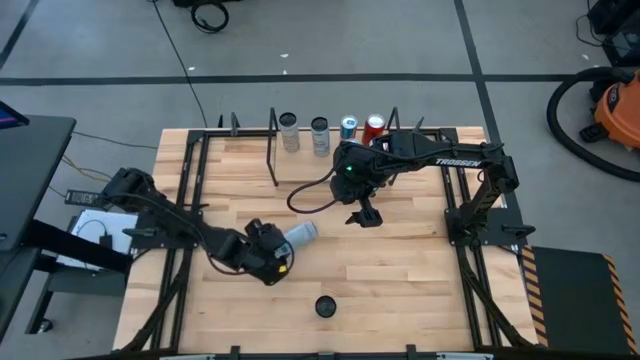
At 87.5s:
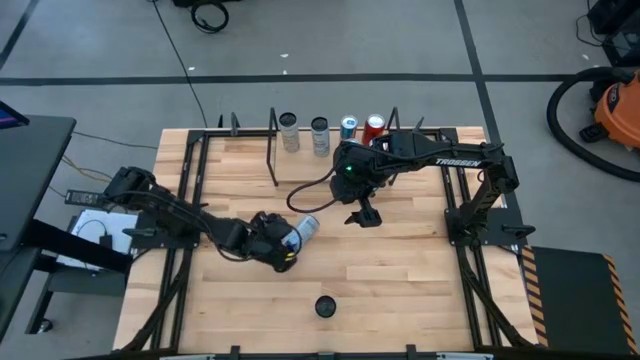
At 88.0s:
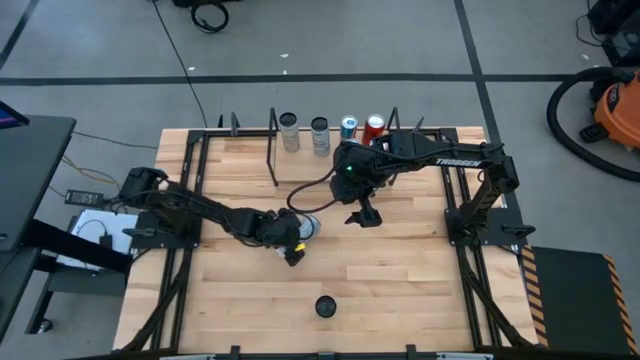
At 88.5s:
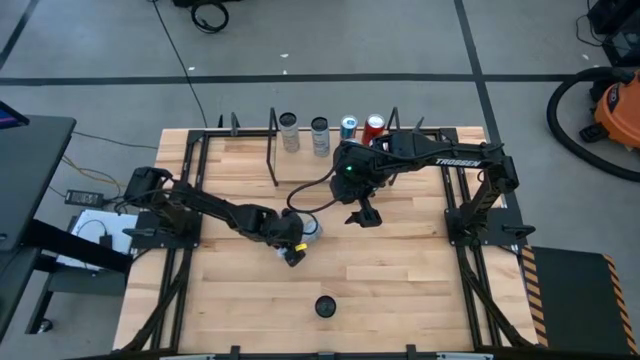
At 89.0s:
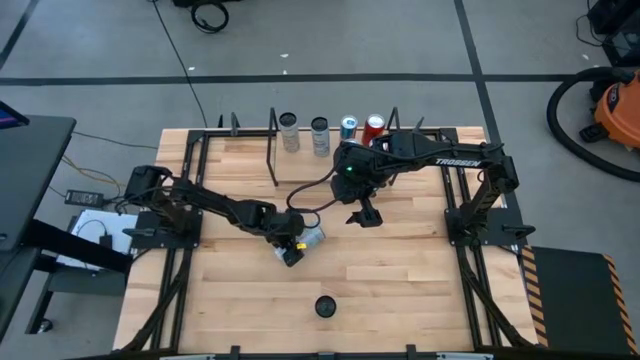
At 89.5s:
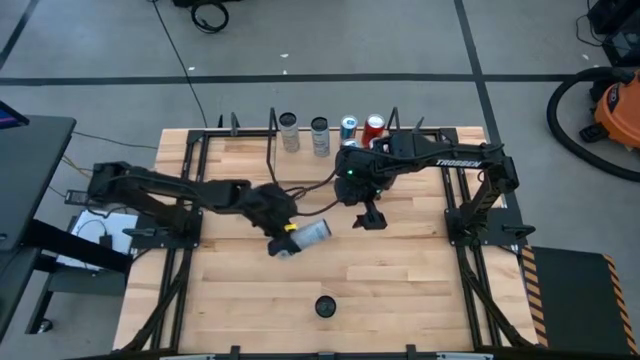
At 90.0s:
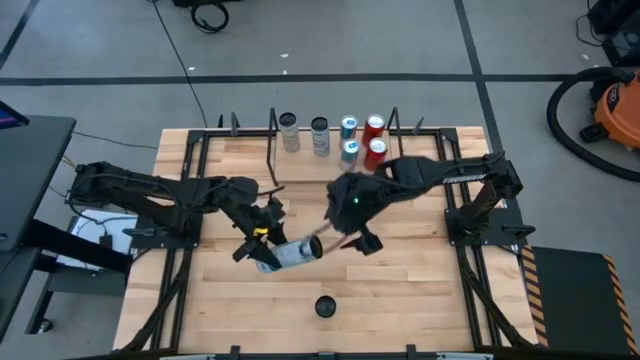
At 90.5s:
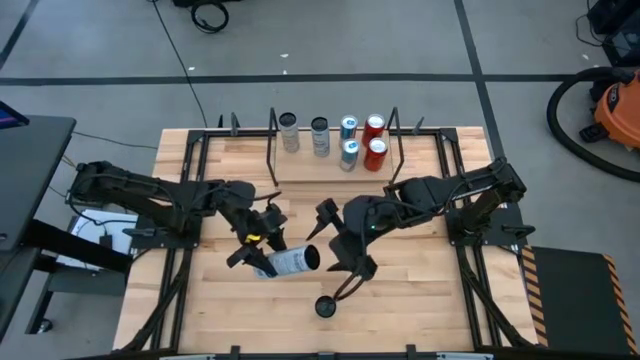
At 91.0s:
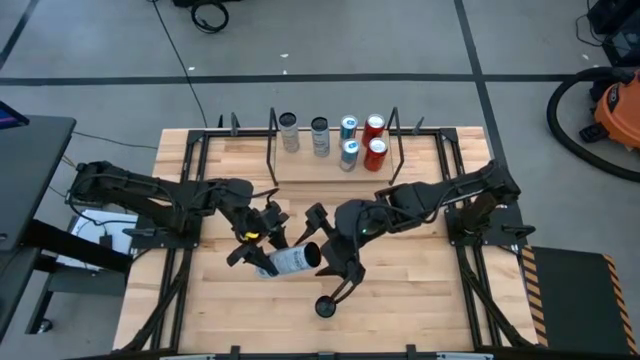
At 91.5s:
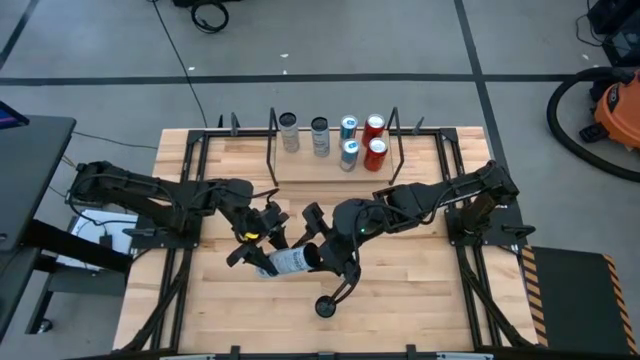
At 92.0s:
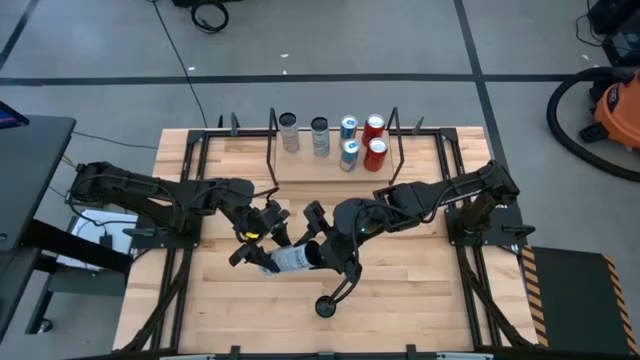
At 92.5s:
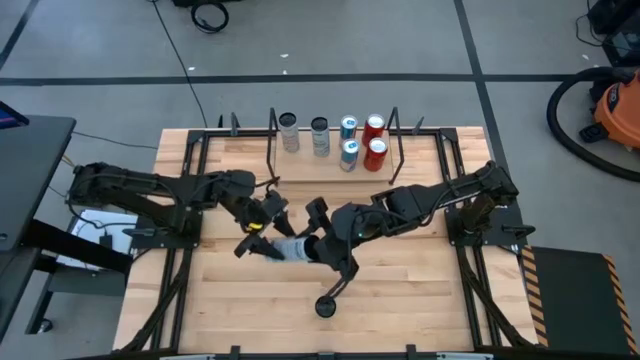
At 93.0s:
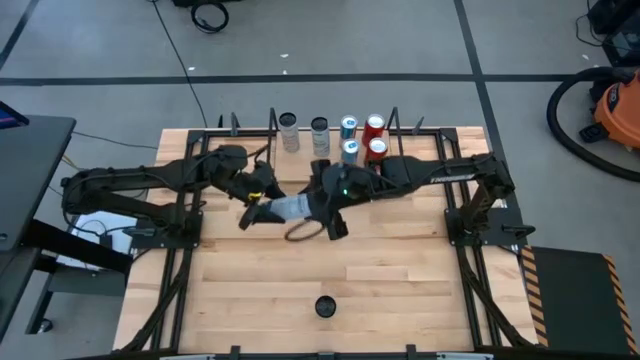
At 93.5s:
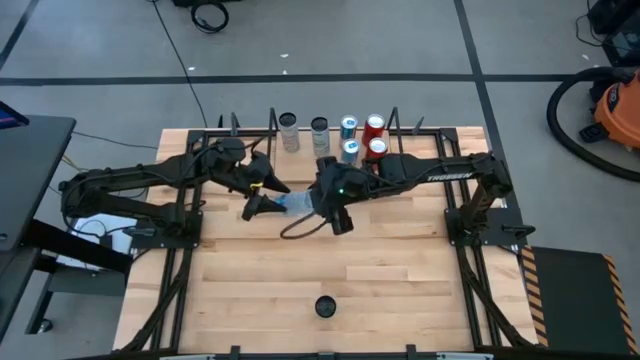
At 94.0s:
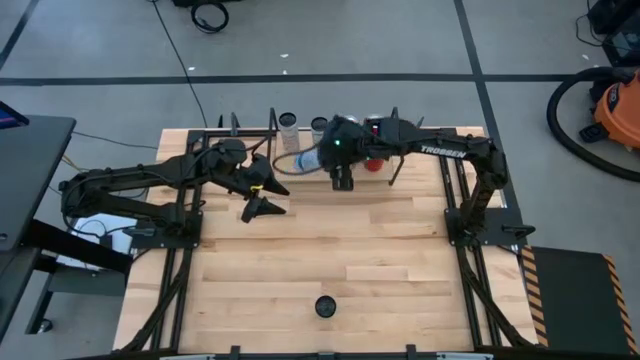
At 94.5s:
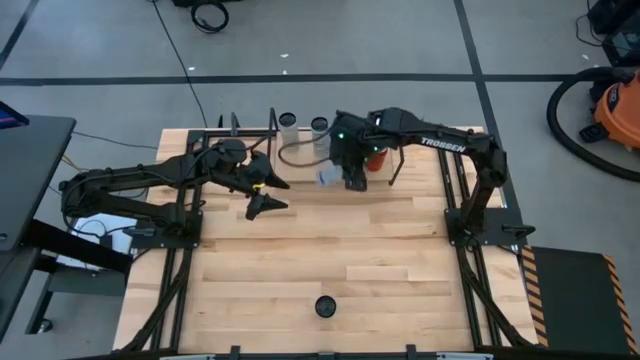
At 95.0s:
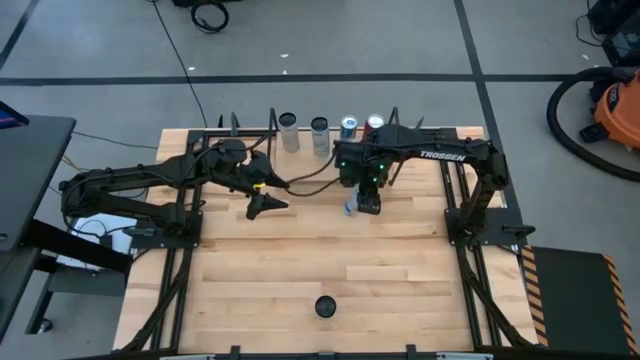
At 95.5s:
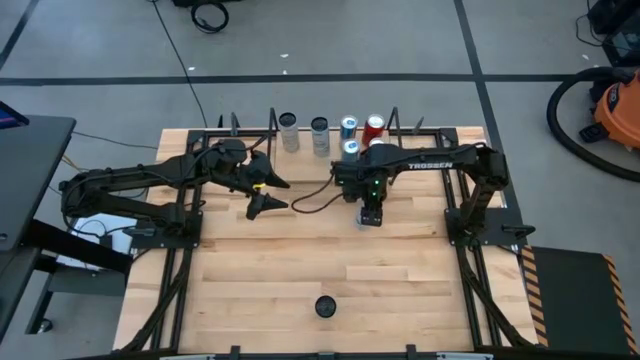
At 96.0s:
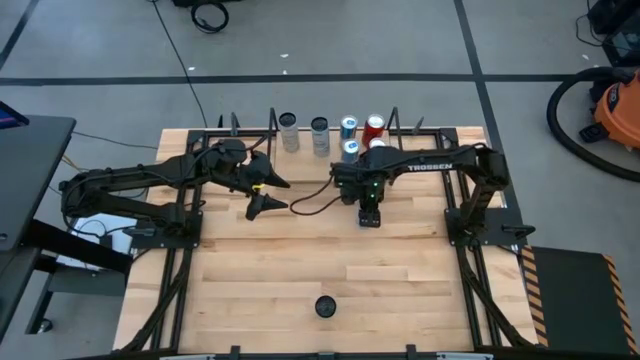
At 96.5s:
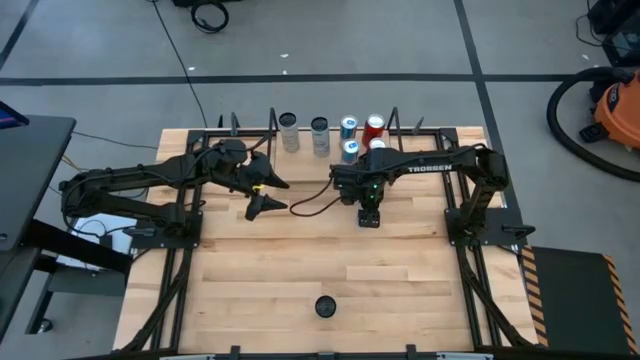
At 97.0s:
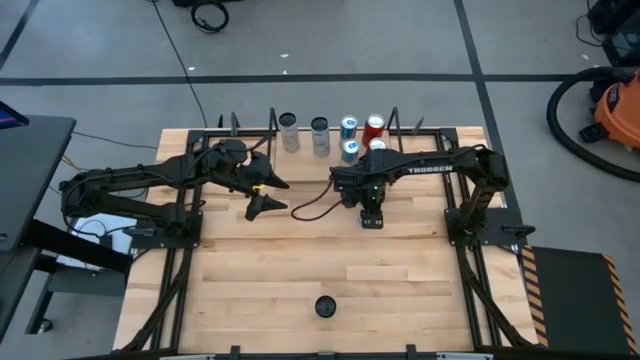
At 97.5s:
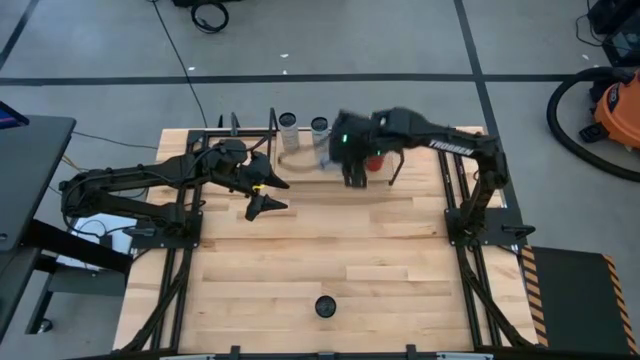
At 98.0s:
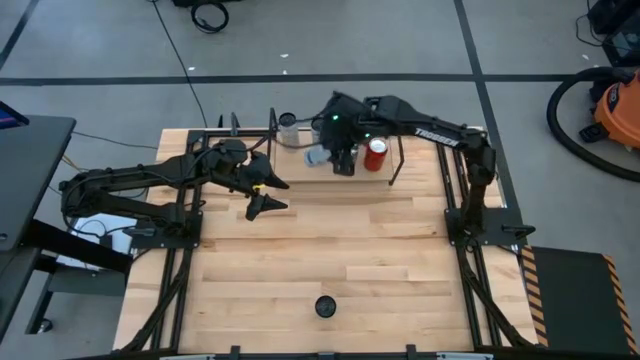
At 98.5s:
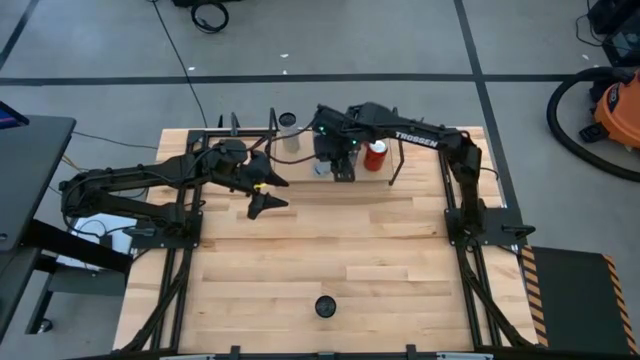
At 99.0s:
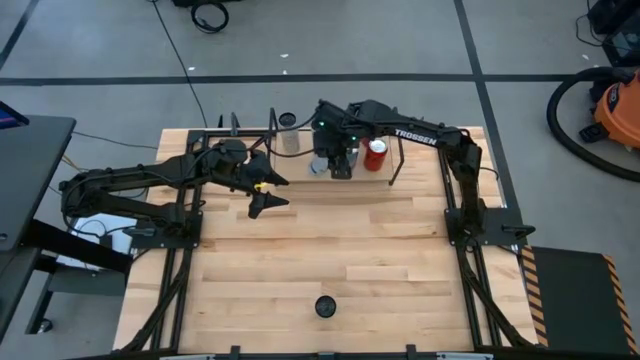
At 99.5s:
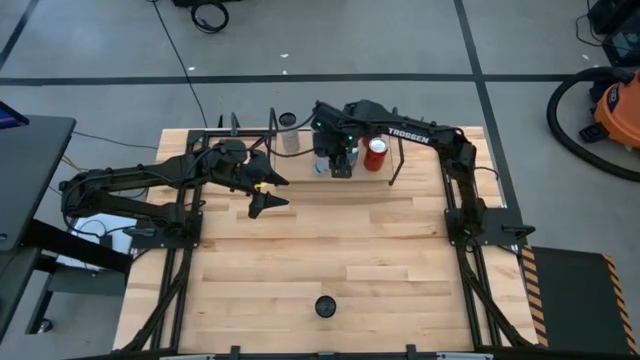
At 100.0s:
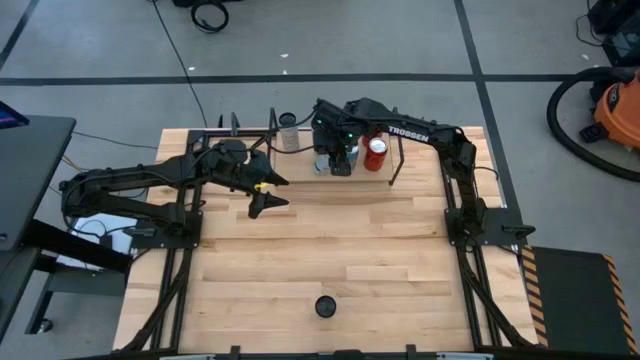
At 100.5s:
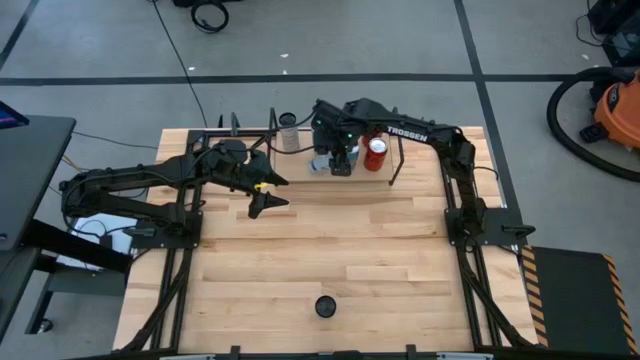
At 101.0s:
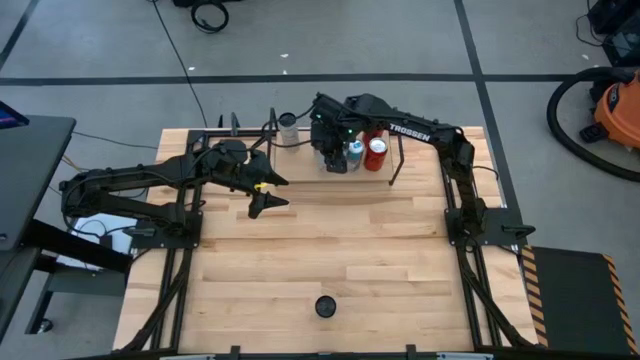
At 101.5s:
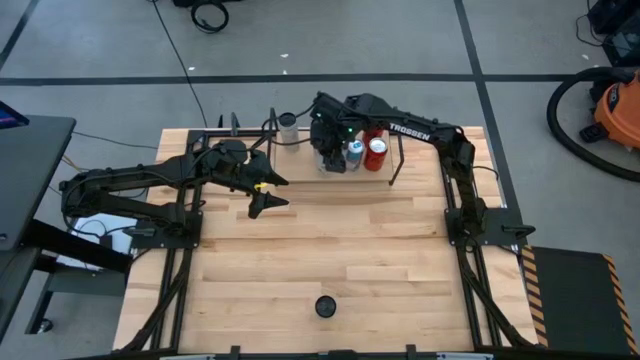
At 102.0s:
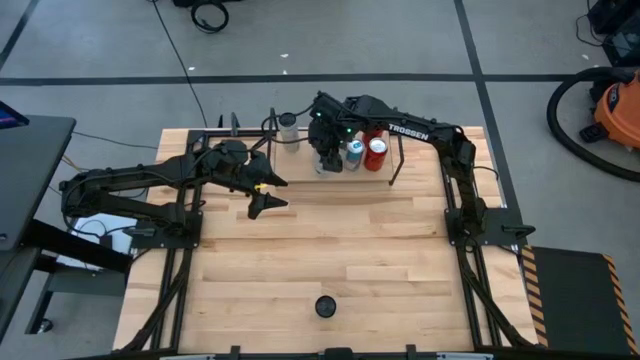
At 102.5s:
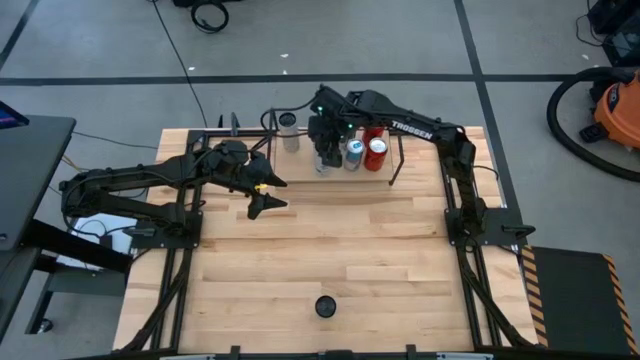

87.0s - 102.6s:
Task: Place canned beverage on shelf
Put the white blue soda can on the shelf aligned with the white blue soda can

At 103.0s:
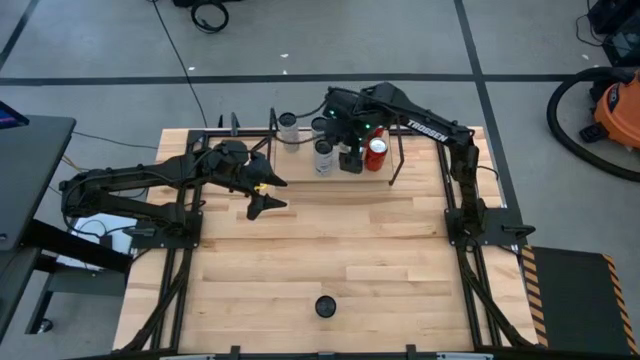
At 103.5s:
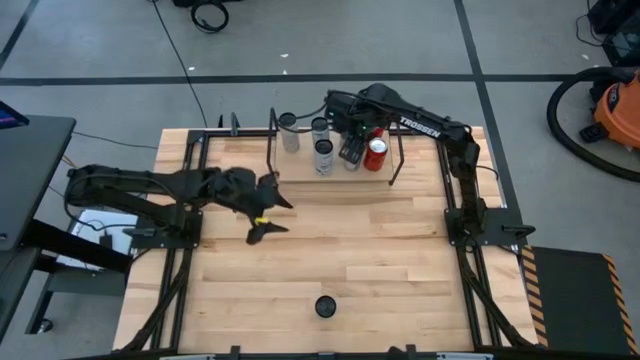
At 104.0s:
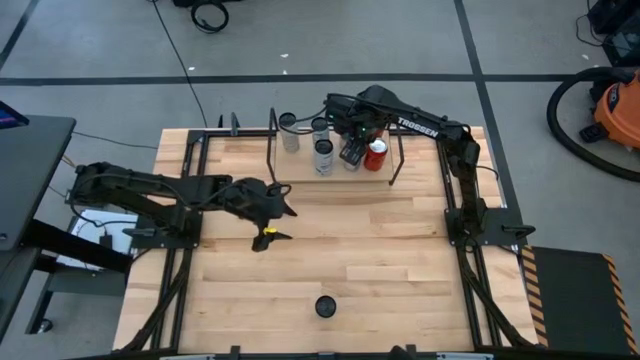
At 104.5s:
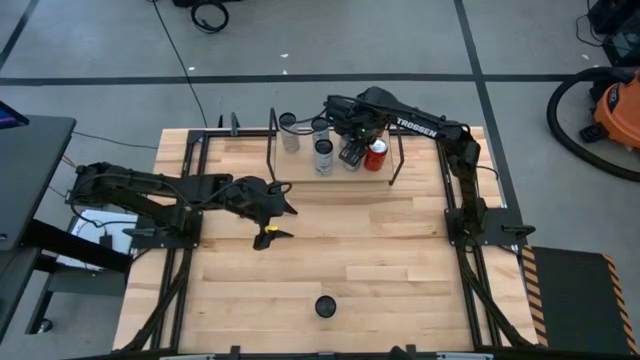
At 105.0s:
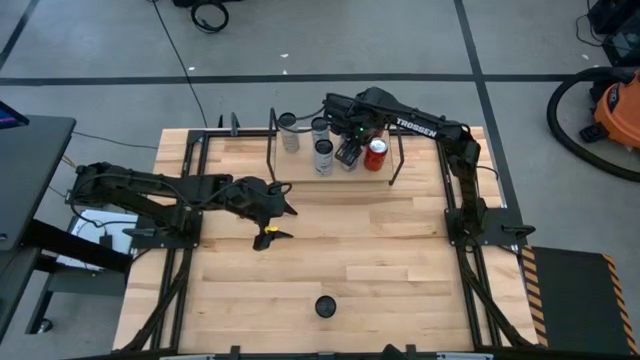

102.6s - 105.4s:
Adjust the blue soda can on the shelf

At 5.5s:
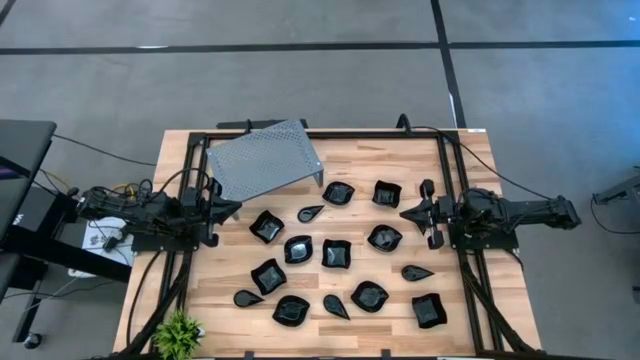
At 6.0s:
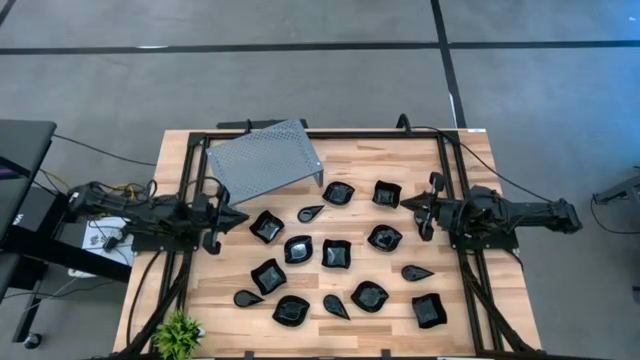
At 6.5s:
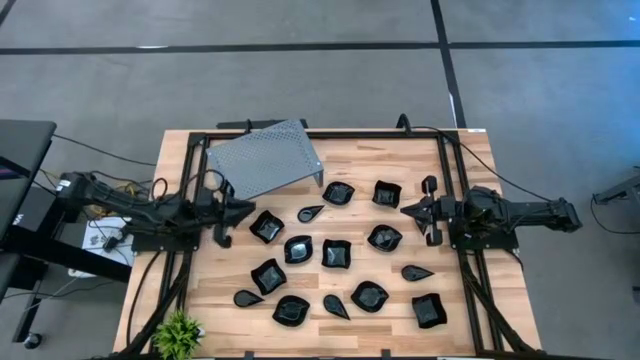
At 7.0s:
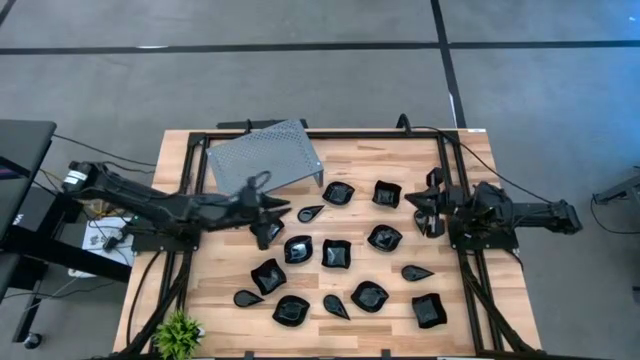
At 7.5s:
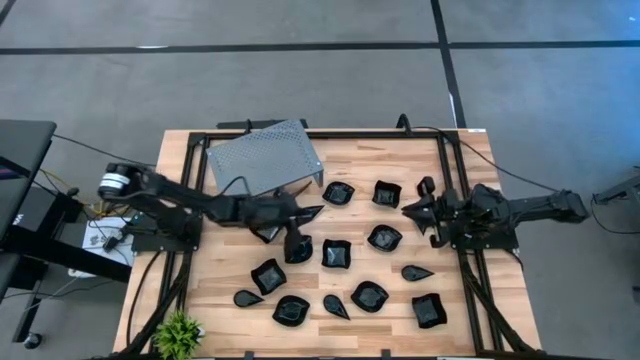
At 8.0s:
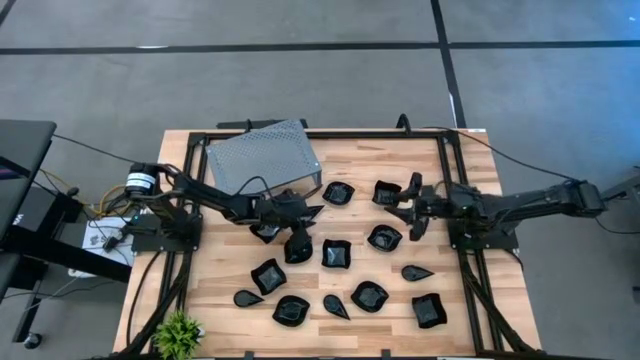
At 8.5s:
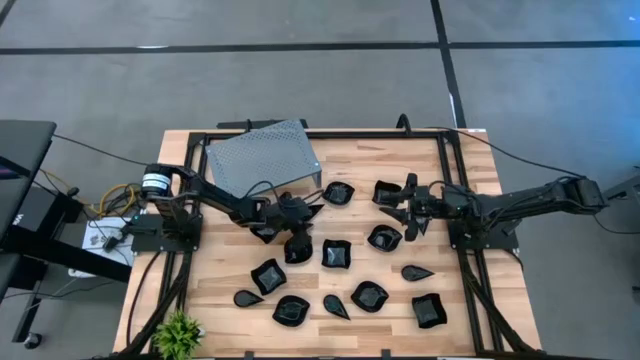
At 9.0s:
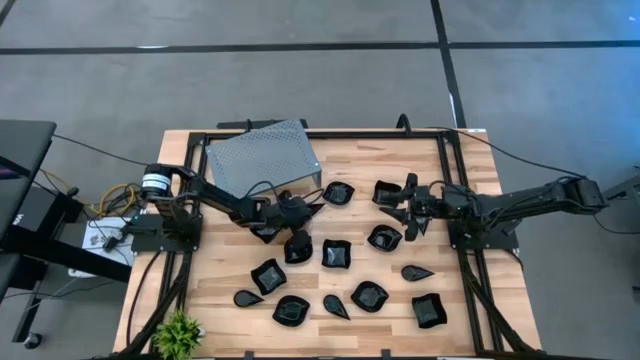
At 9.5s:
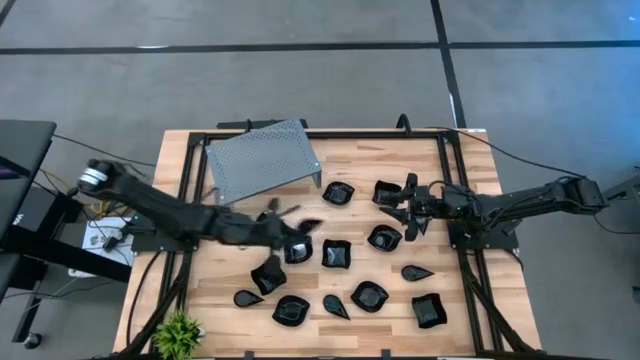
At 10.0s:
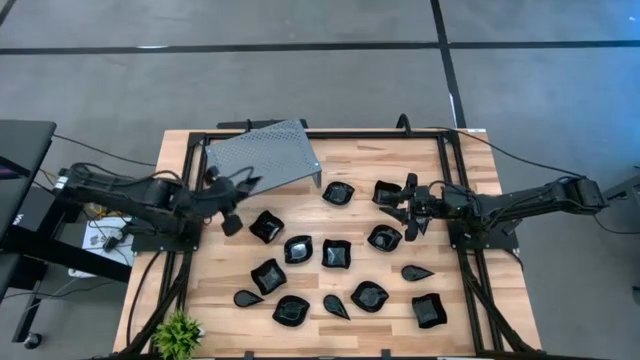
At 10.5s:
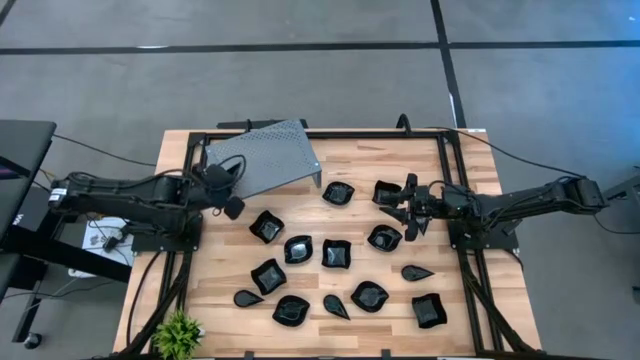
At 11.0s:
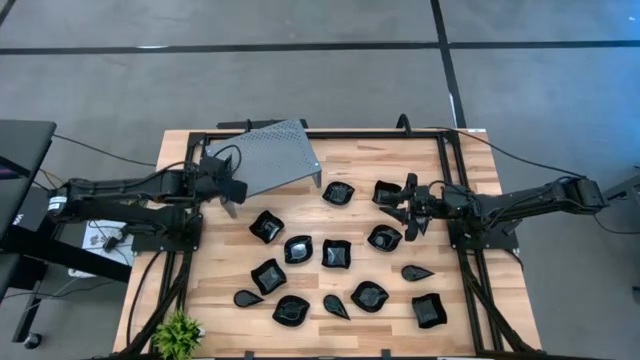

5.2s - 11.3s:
Task: Pick & Place Mini shaped plates
Put the black drop plate on the shelf
